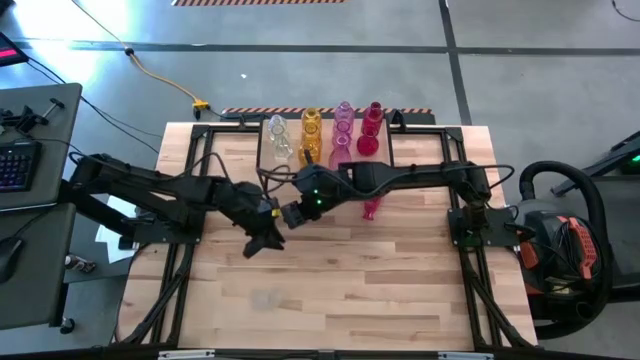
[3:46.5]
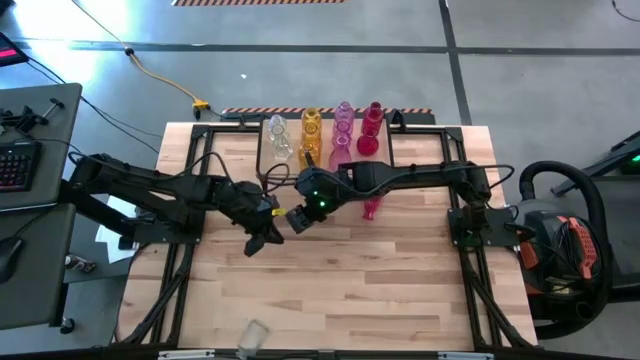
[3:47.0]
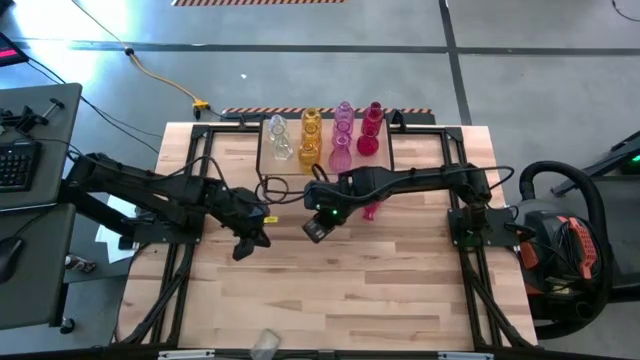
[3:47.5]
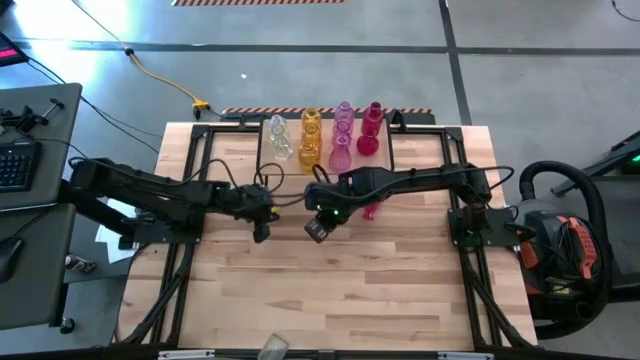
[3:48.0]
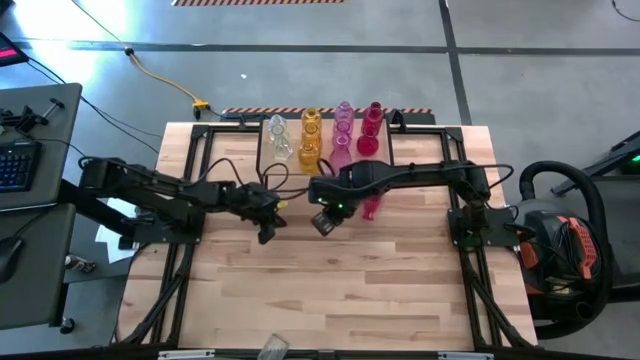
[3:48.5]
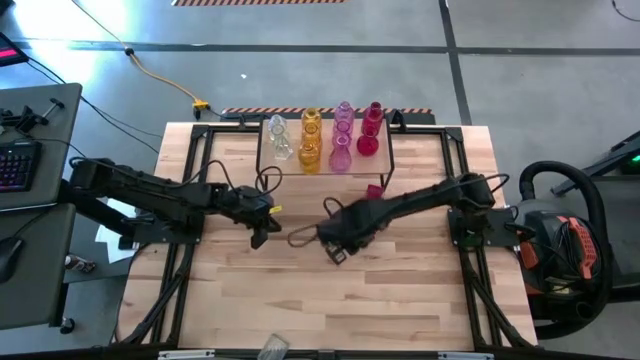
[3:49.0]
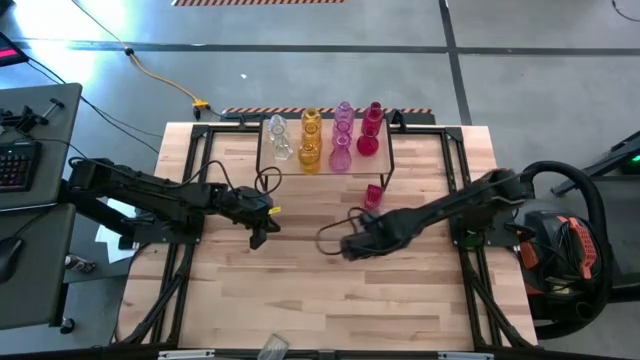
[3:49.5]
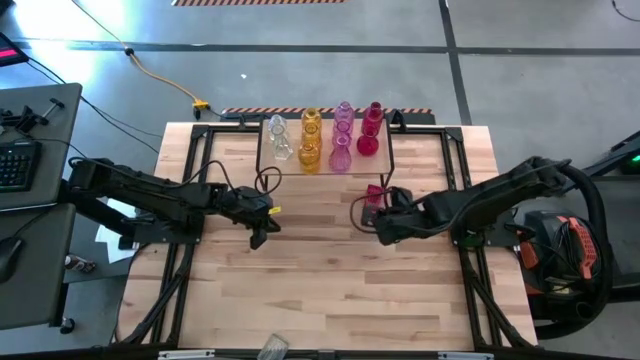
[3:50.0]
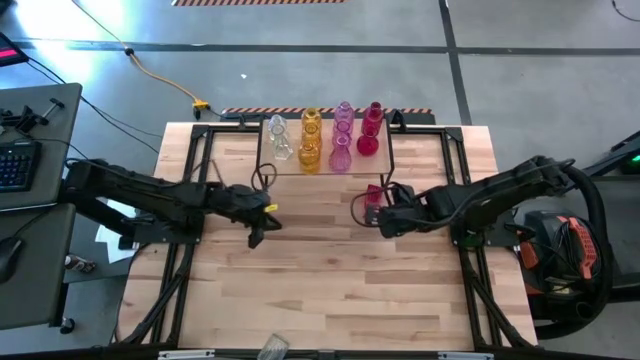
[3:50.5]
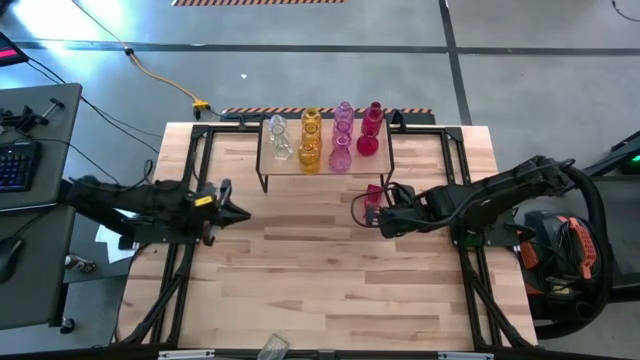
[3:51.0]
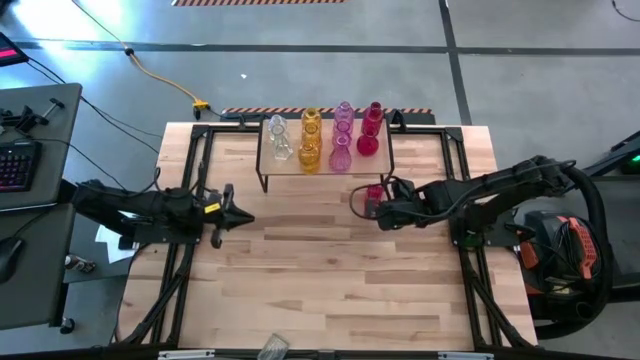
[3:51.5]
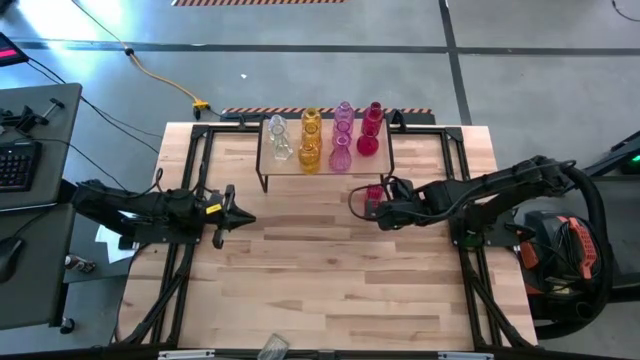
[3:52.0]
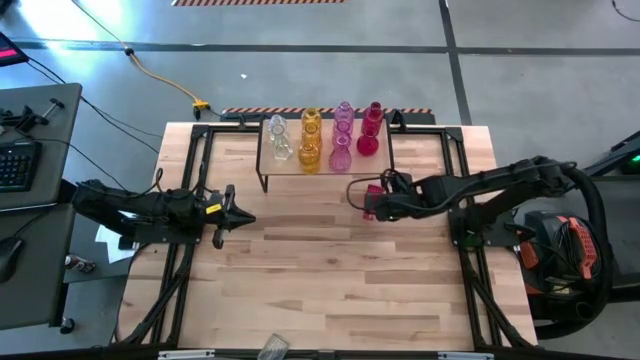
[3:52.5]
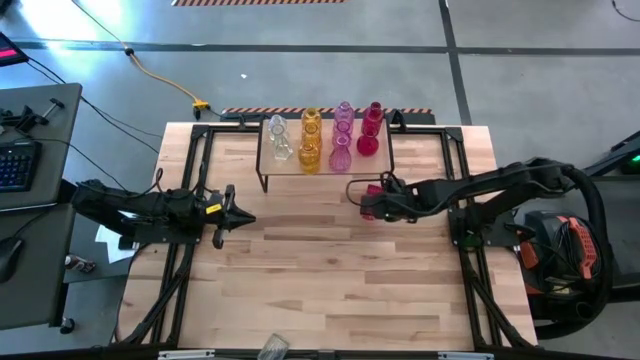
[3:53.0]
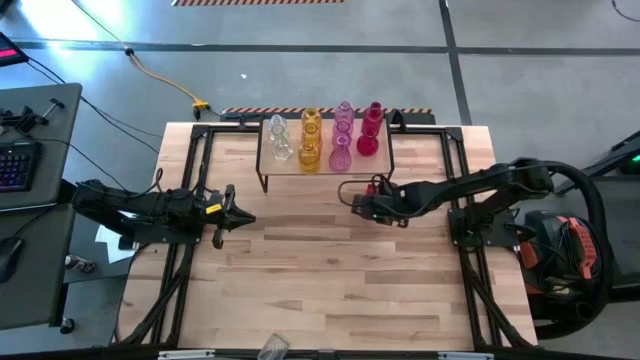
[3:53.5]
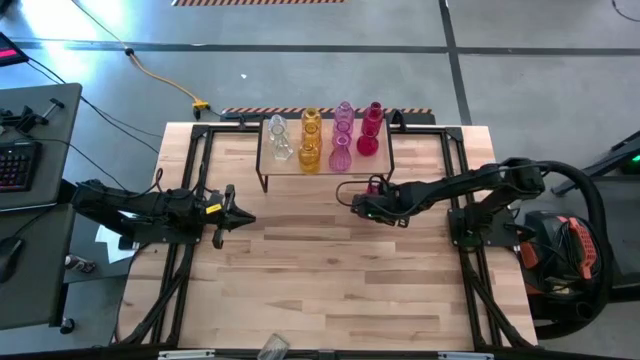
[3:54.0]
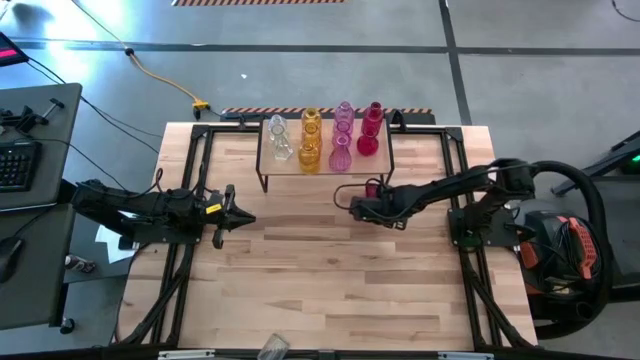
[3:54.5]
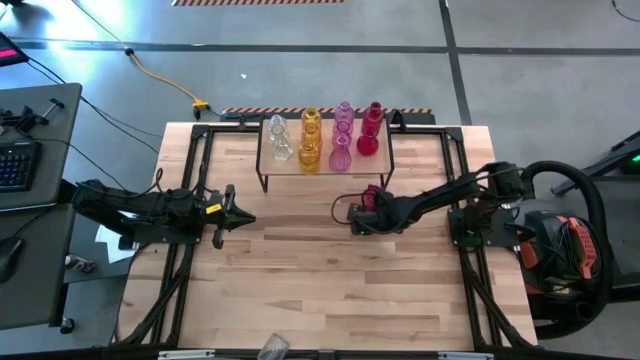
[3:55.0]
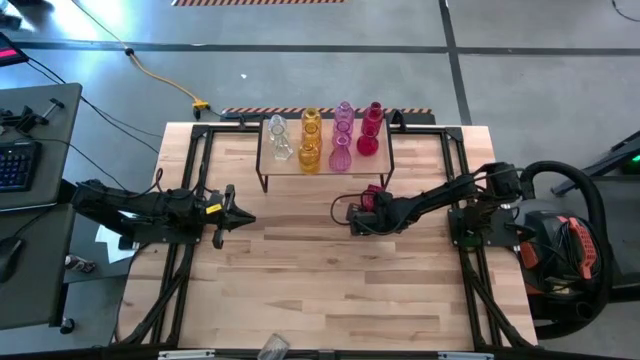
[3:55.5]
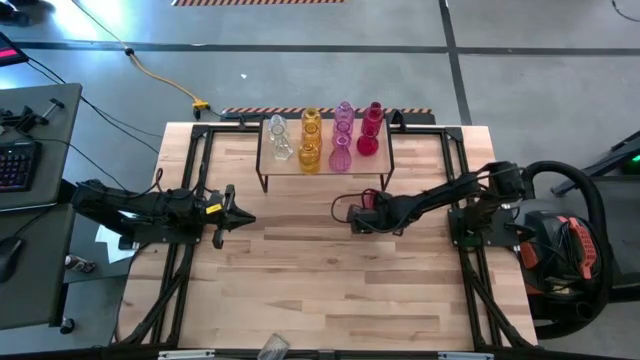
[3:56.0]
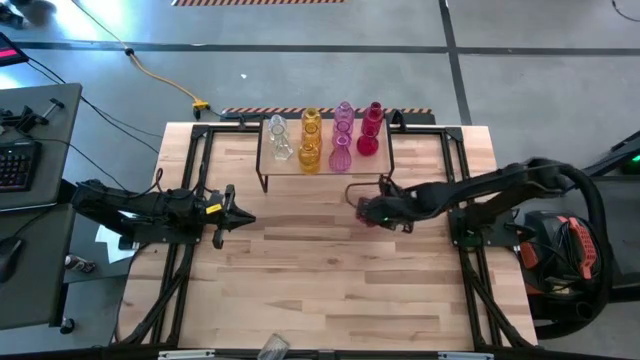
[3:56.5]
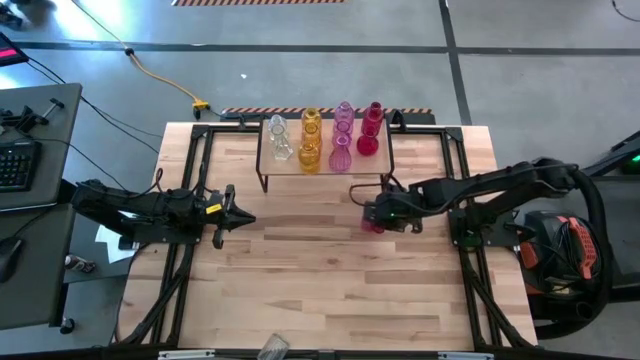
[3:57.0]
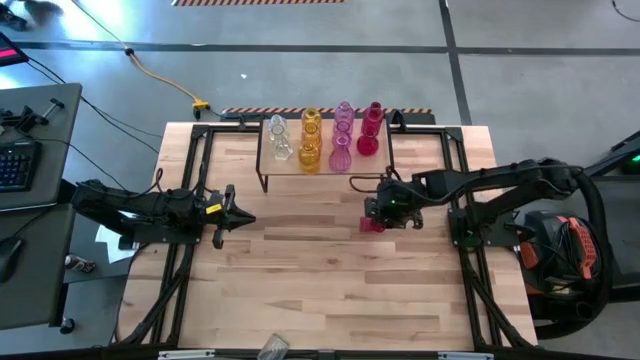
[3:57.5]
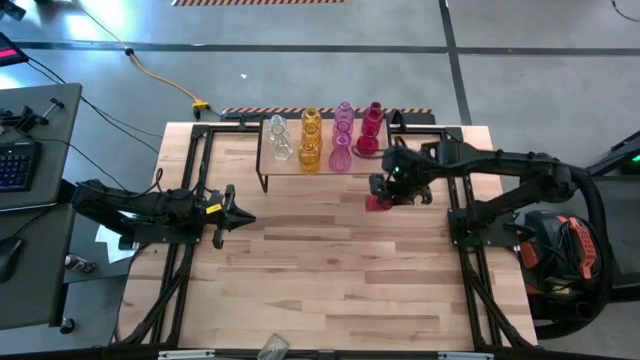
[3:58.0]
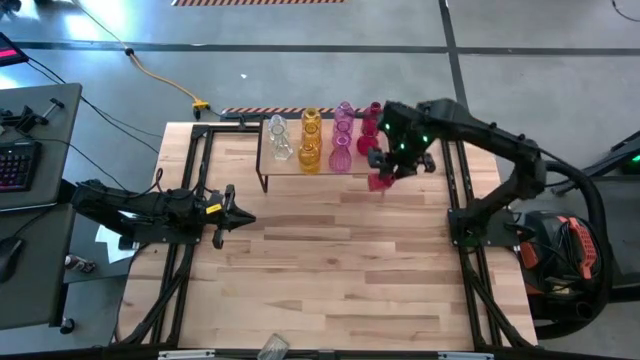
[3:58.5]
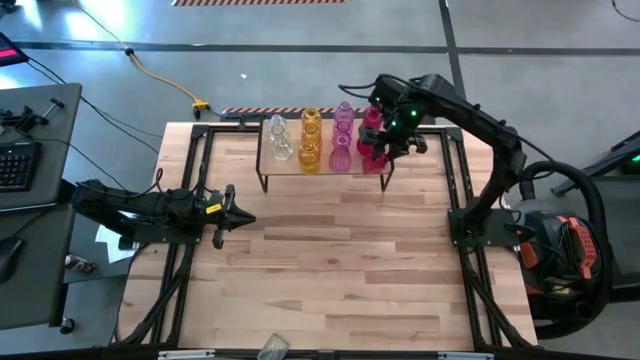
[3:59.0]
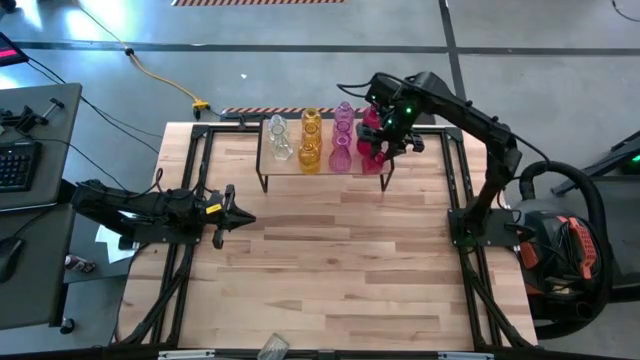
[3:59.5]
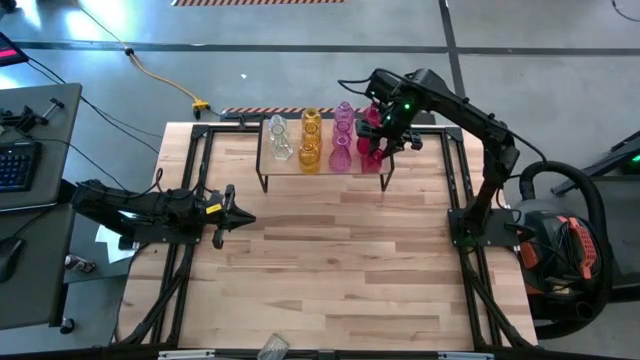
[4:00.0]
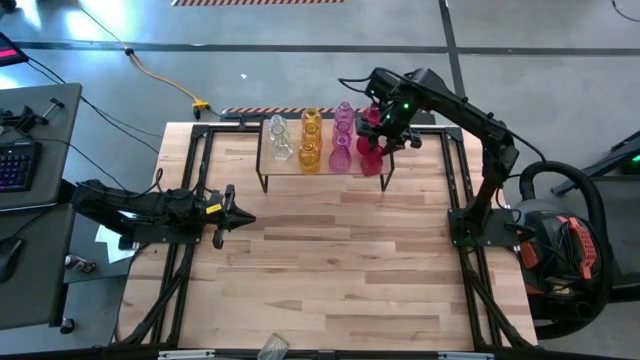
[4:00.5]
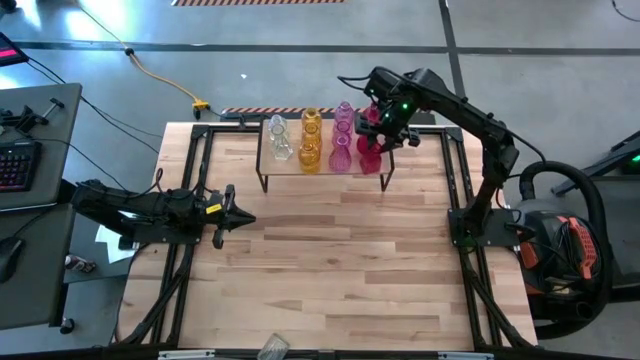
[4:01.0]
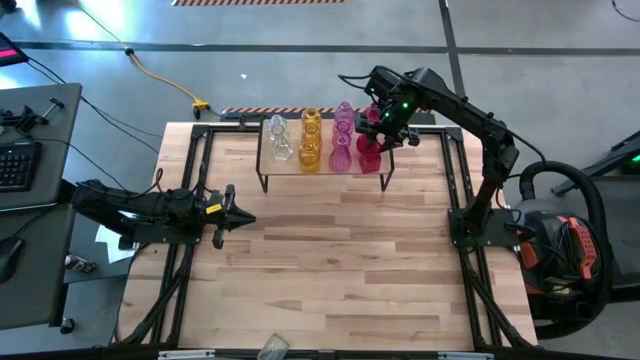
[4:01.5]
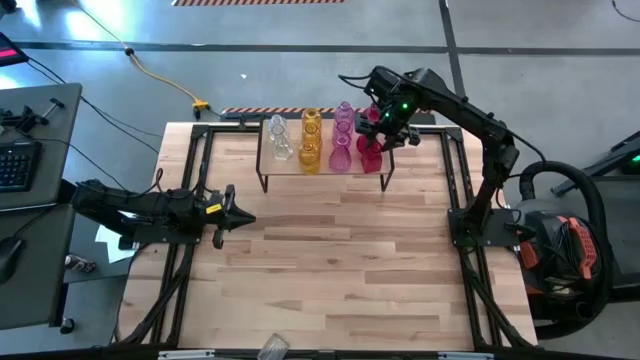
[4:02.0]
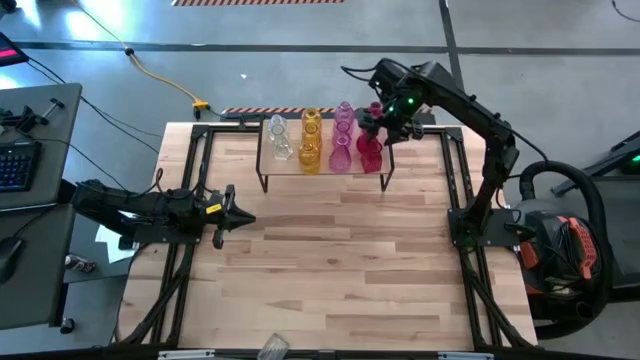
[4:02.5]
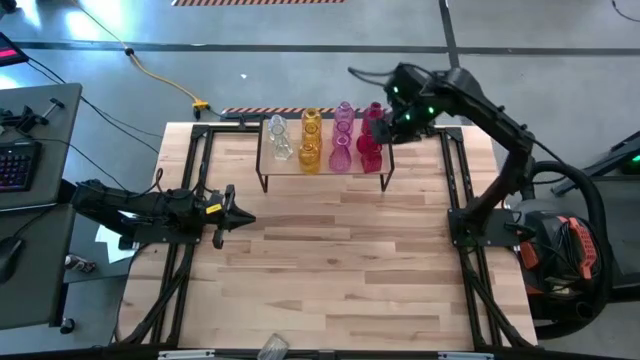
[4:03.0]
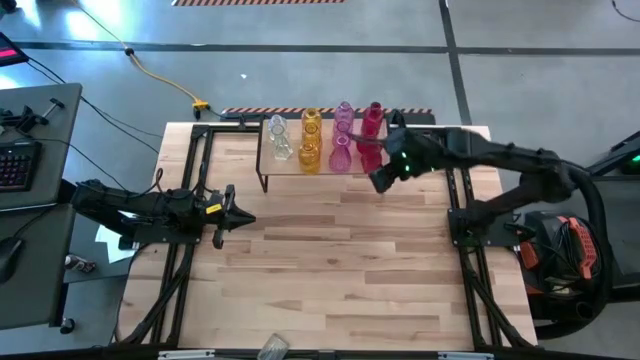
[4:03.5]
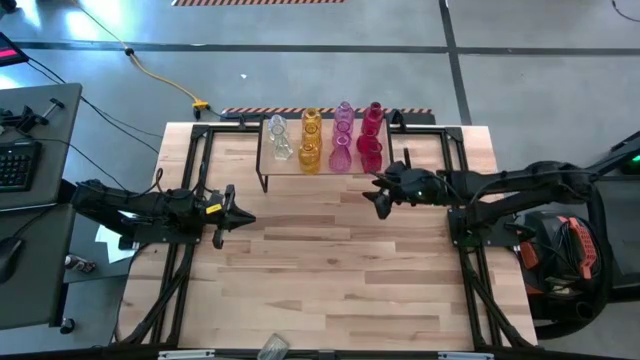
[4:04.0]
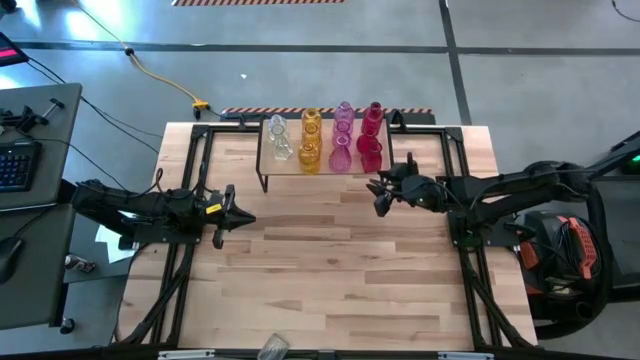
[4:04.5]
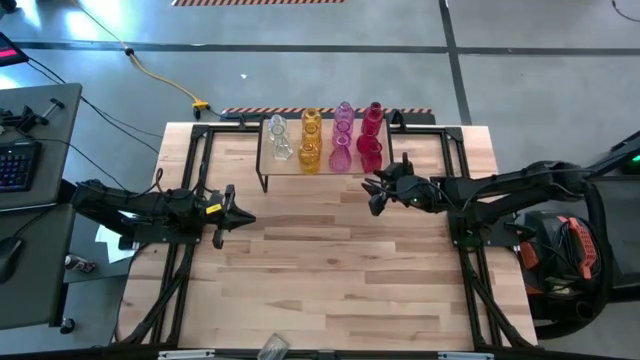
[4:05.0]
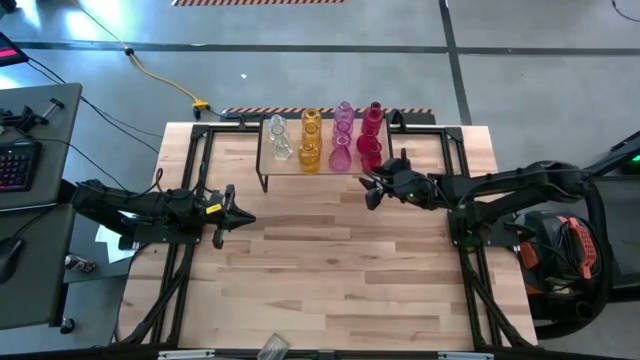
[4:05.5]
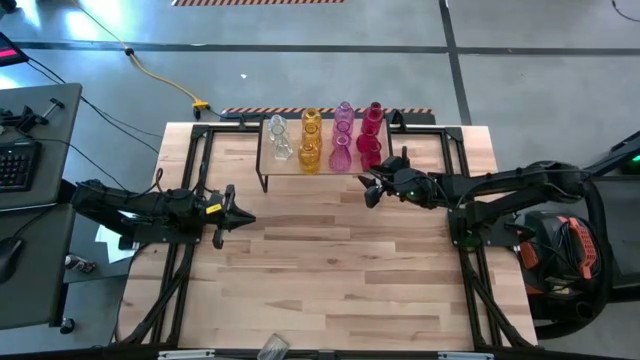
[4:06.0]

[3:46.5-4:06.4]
Task: sort vases onto shelf
Put the red vase aligned with the other red vase on the shelf

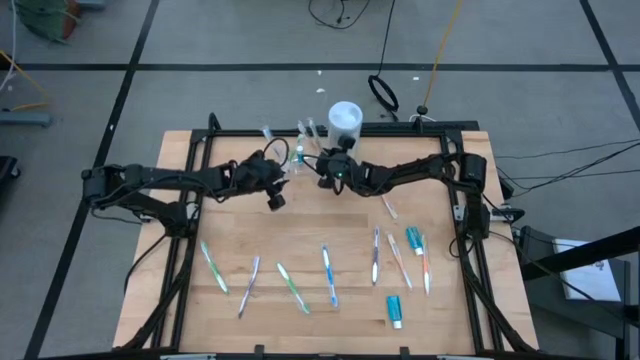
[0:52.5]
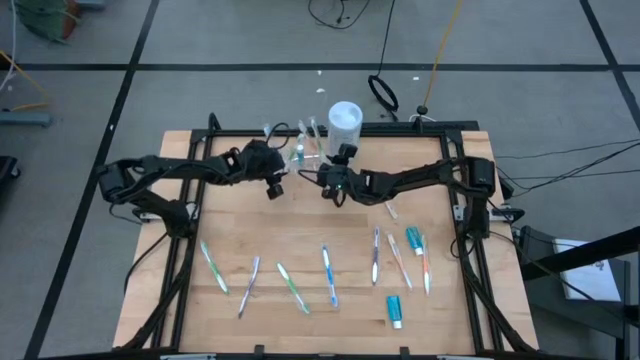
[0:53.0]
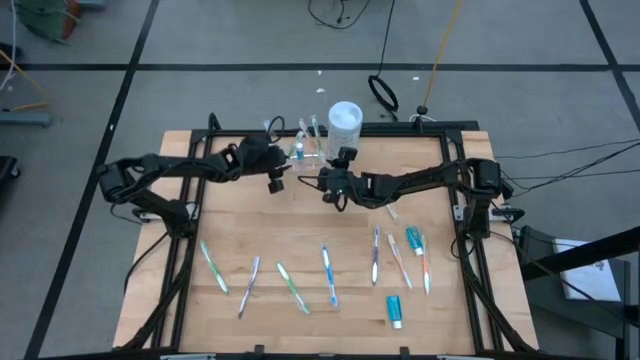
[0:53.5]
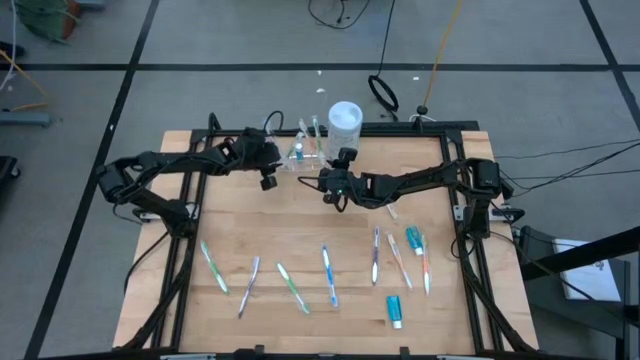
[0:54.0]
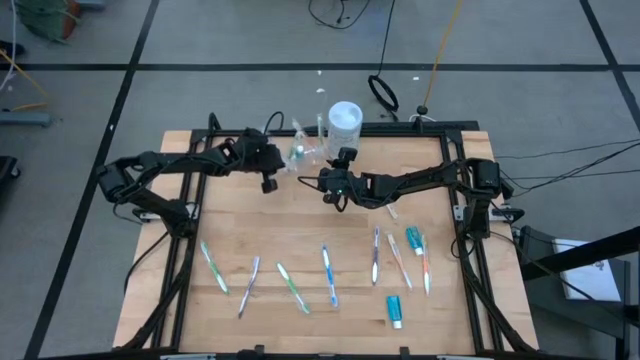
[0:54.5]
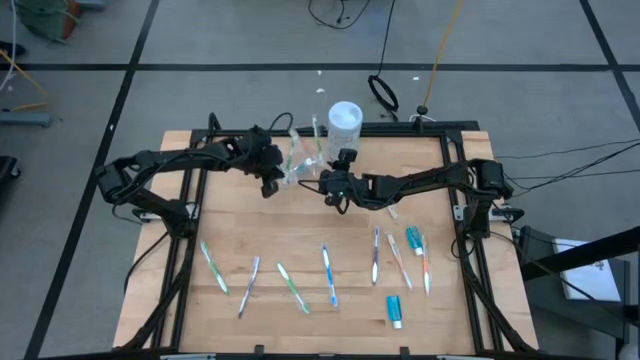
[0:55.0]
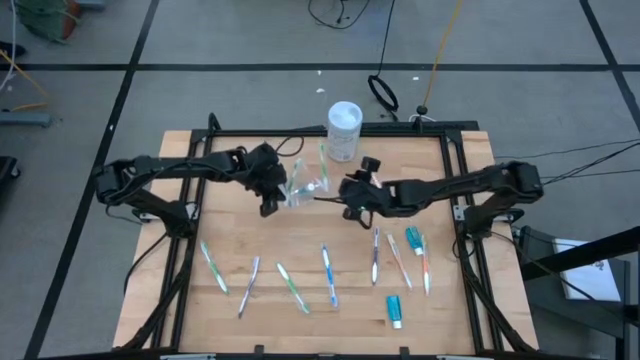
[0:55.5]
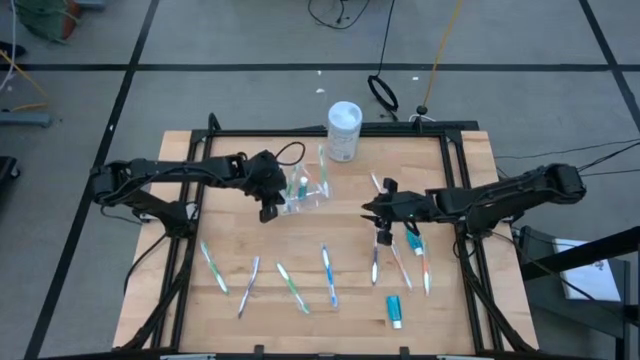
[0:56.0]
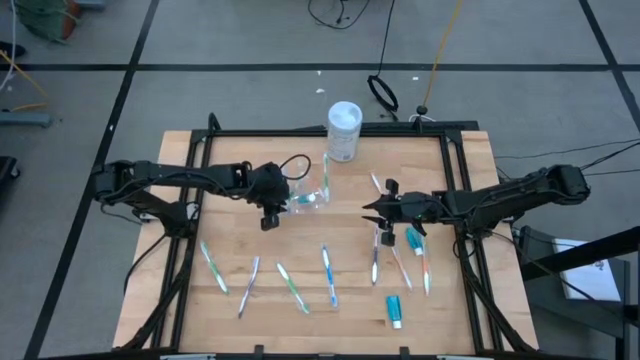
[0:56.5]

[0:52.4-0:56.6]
Task: Pick & Place toothbrushing station
Move the transparent organizer to the center of the table
